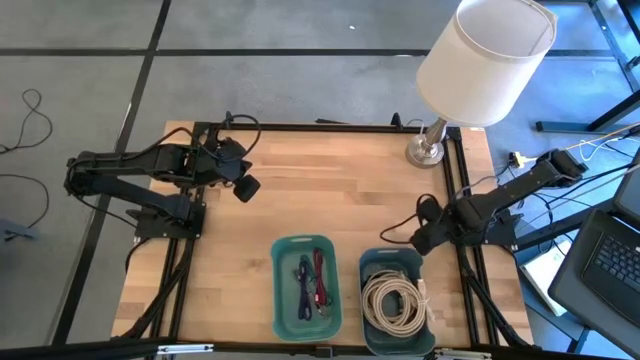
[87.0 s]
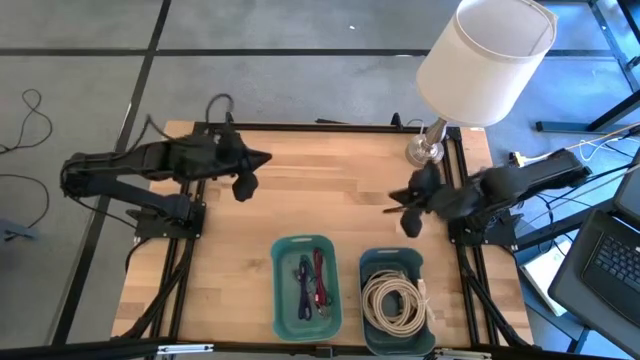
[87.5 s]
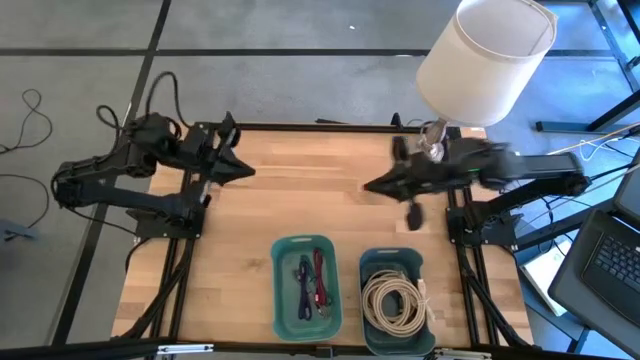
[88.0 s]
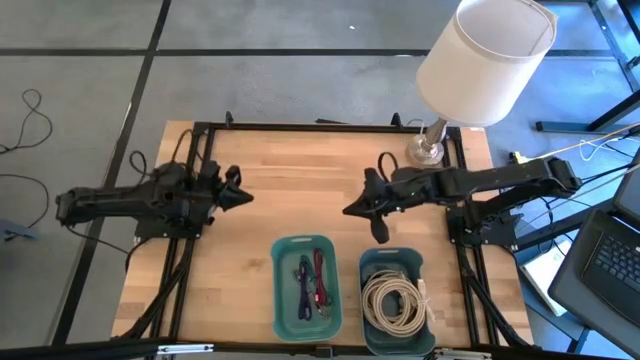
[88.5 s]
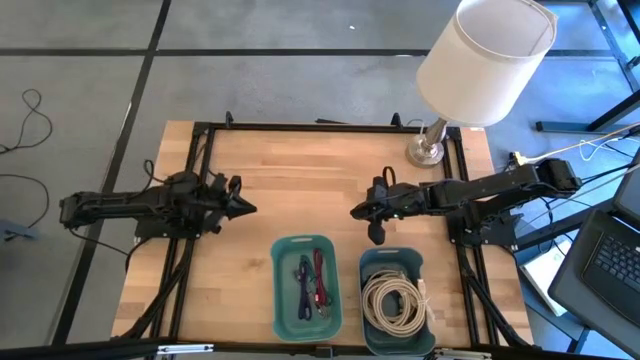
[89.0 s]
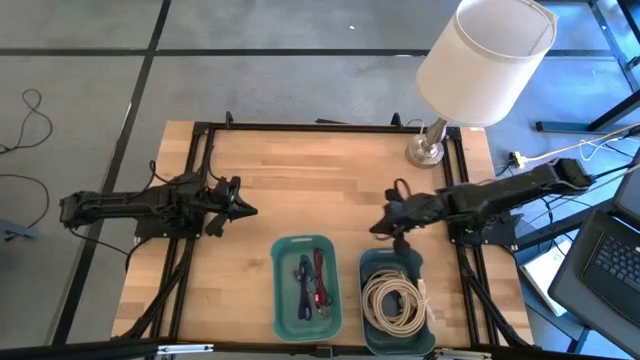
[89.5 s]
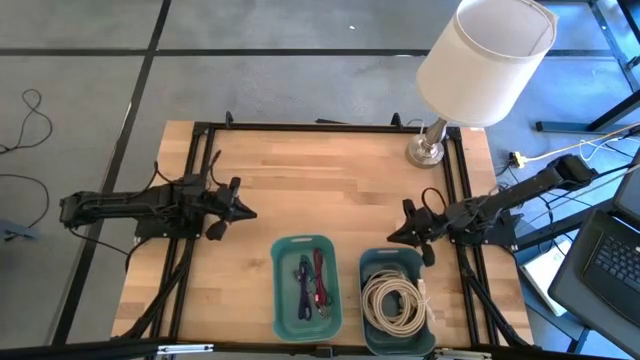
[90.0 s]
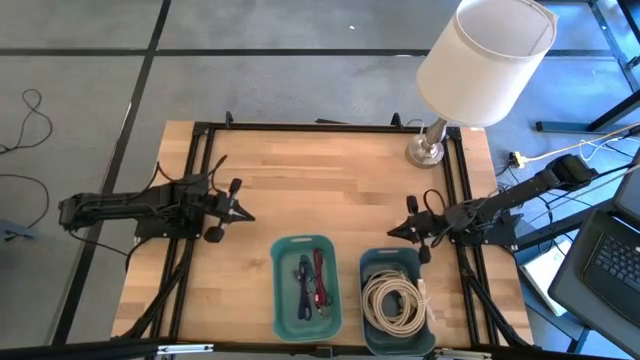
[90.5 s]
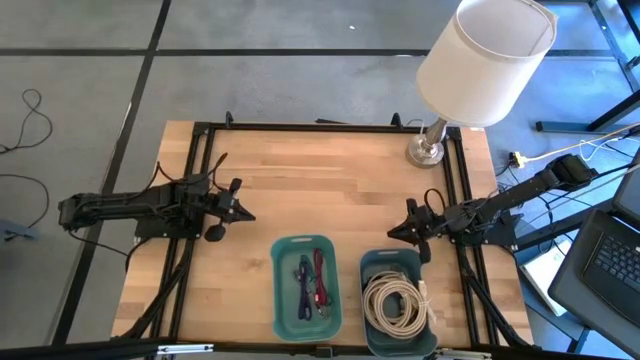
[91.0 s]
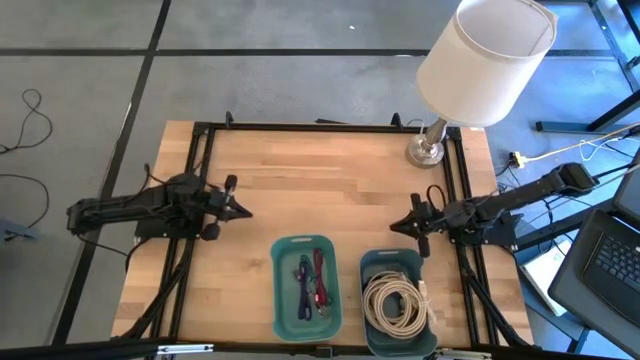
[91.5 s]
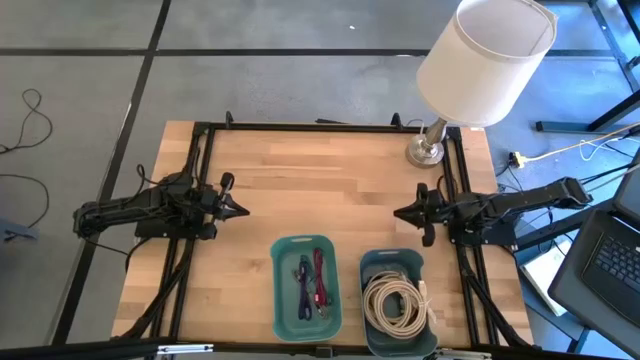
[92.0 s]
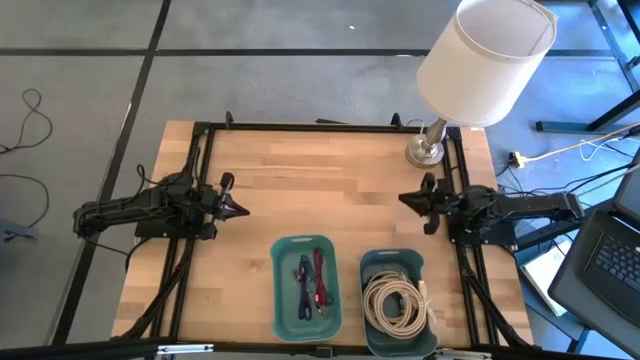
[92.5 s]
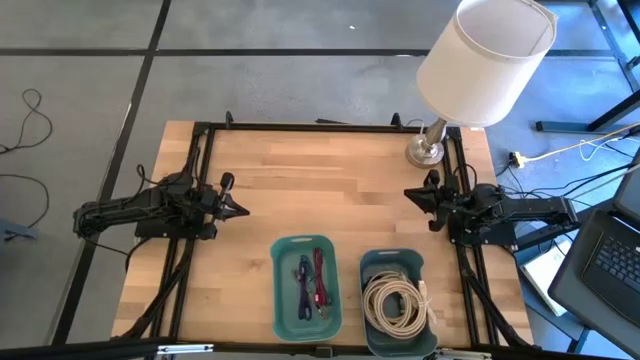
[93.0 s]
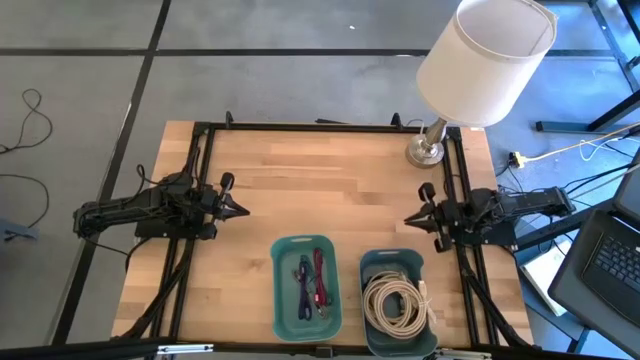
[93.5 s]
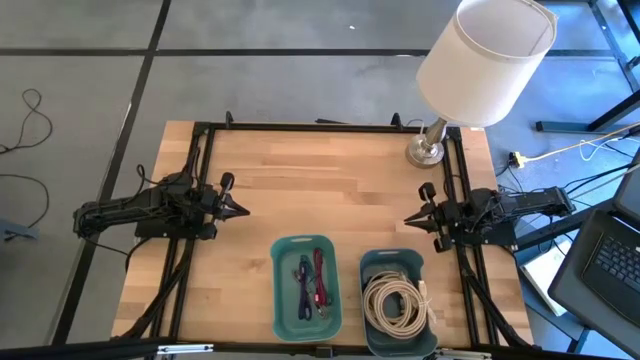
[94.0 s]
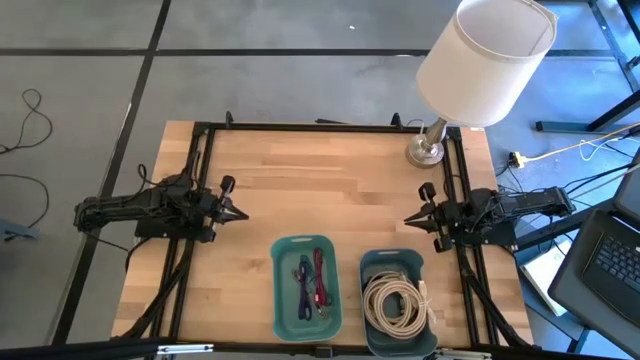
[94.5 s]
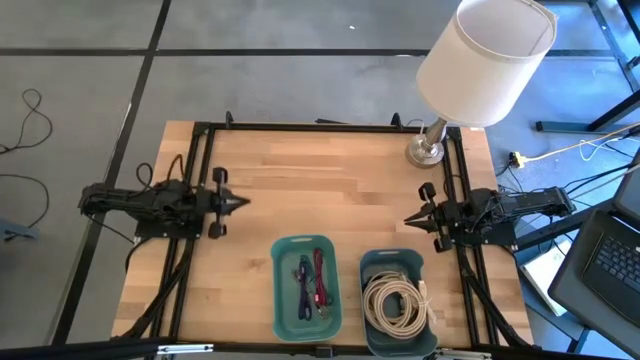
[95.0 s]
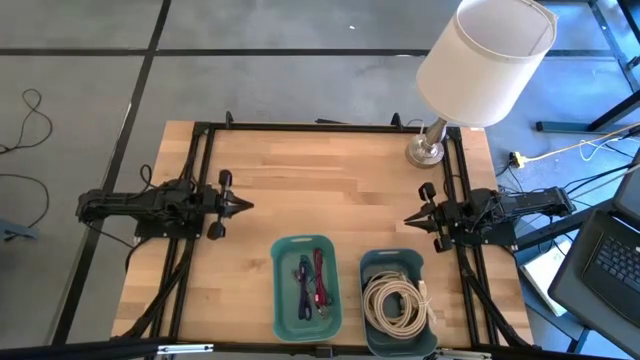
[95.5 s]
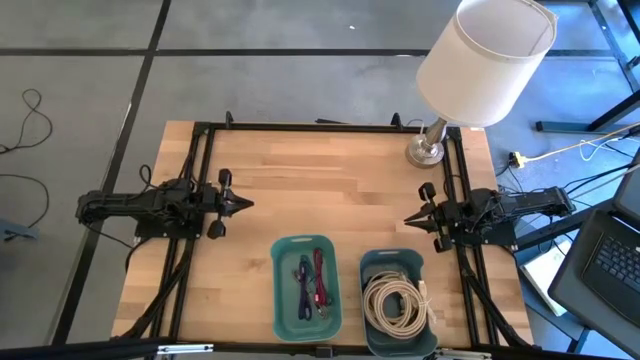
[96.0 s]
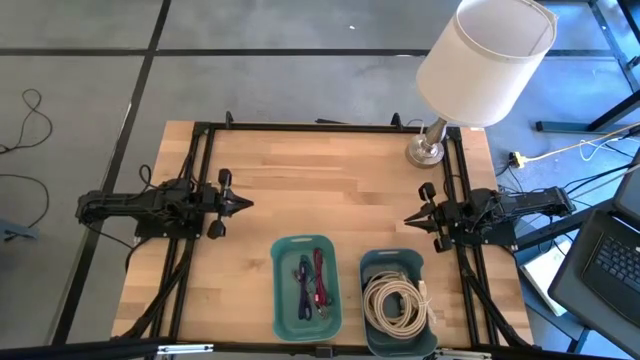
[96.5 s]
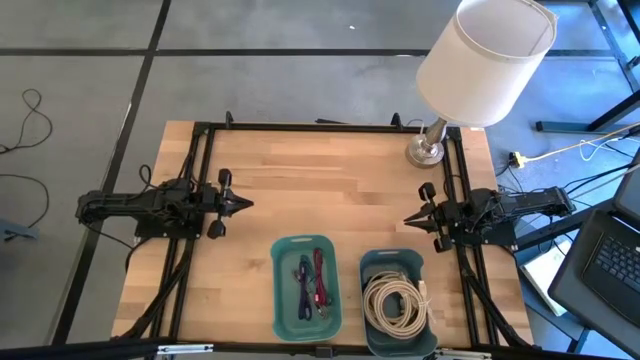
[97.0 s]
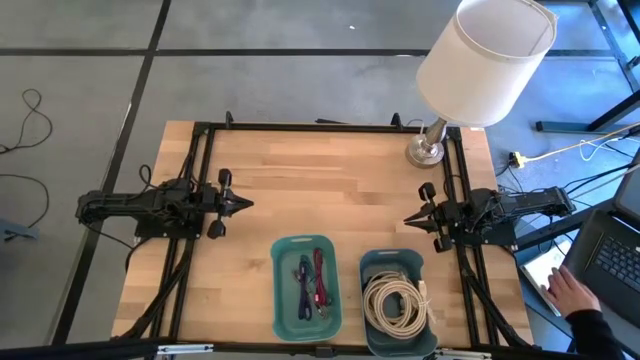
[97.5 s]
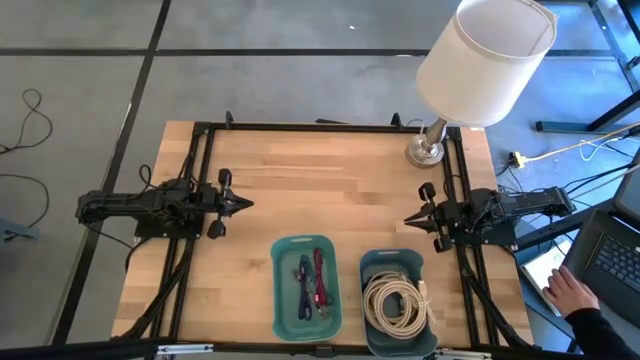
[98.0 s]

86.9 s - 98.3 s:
Task: Pick and place USB-C Cables
Return to Home Position

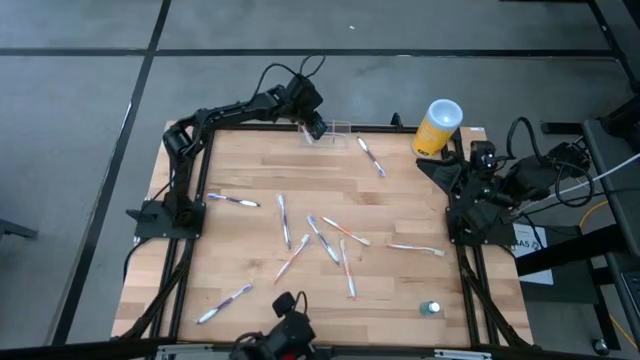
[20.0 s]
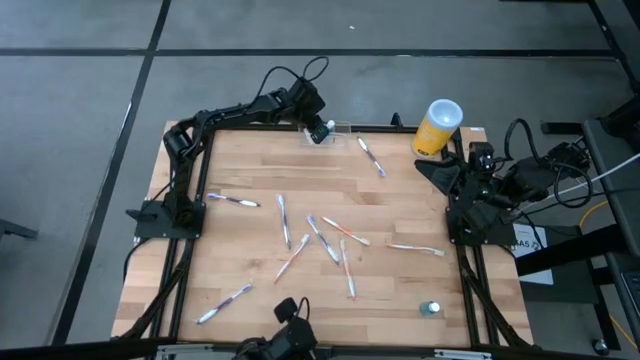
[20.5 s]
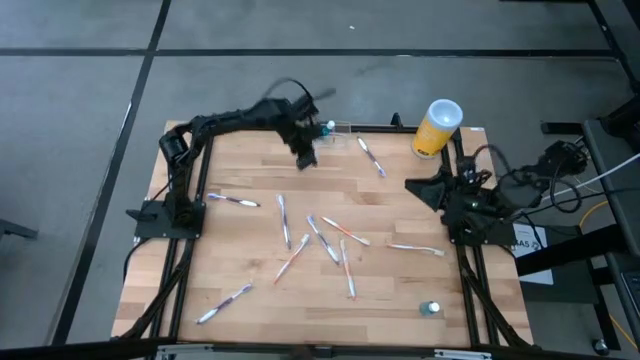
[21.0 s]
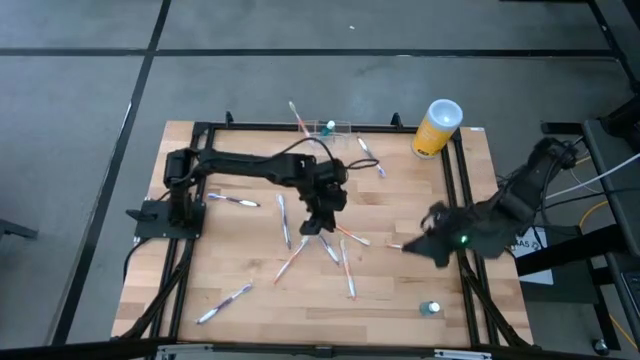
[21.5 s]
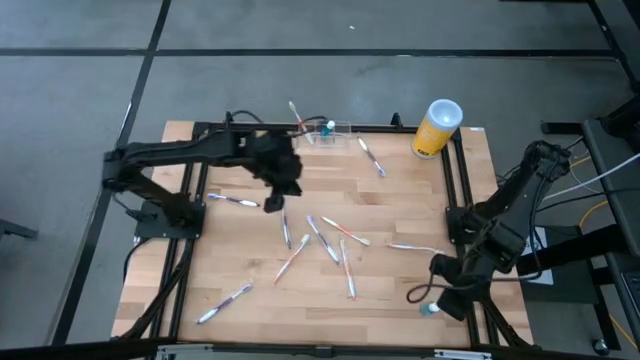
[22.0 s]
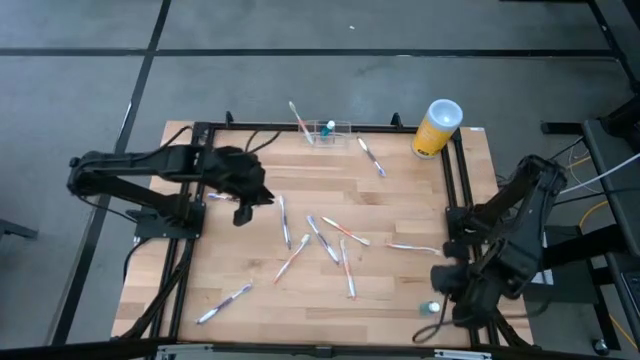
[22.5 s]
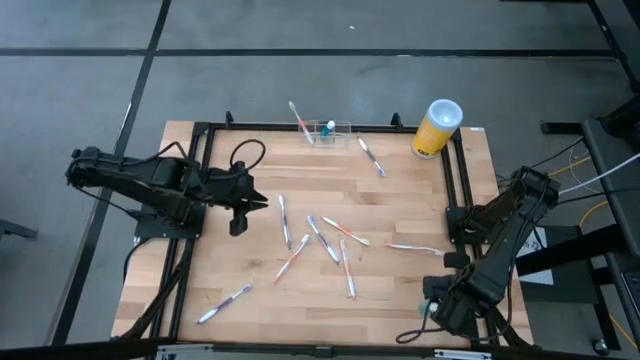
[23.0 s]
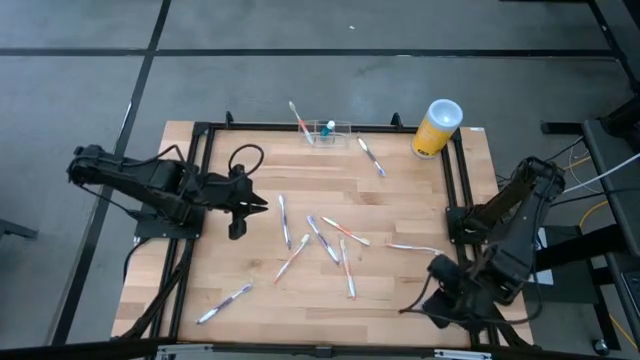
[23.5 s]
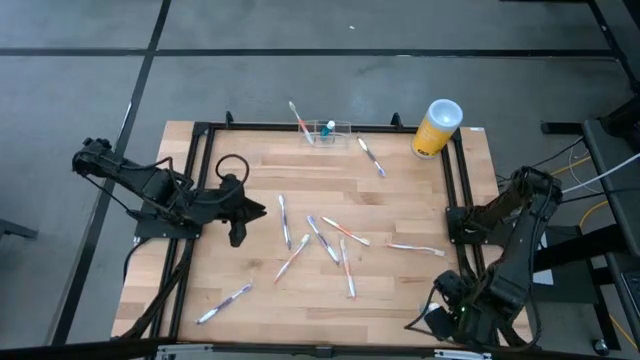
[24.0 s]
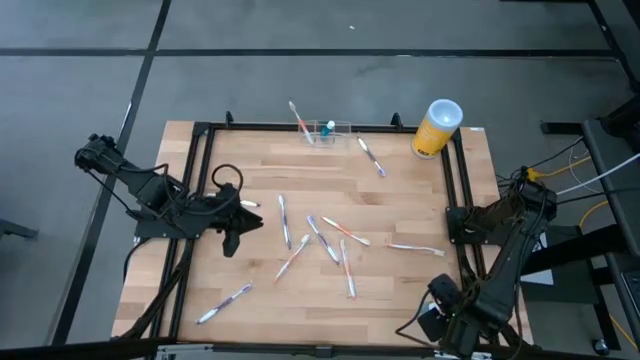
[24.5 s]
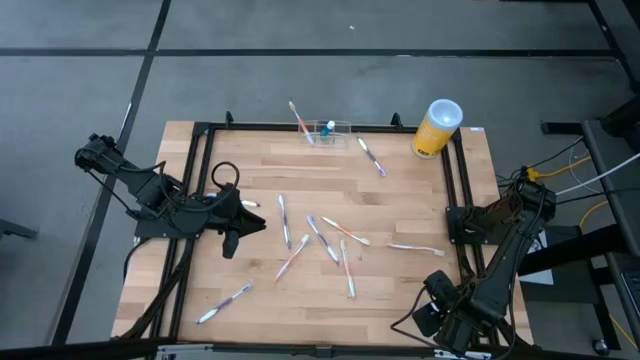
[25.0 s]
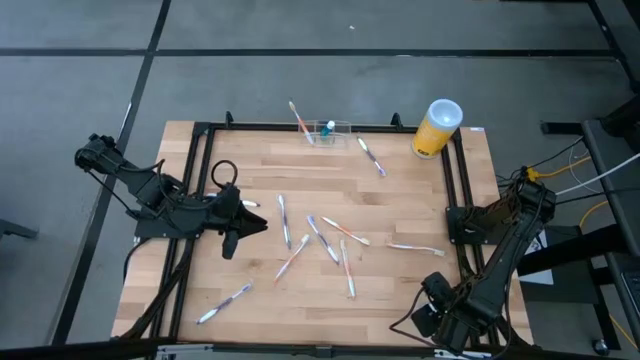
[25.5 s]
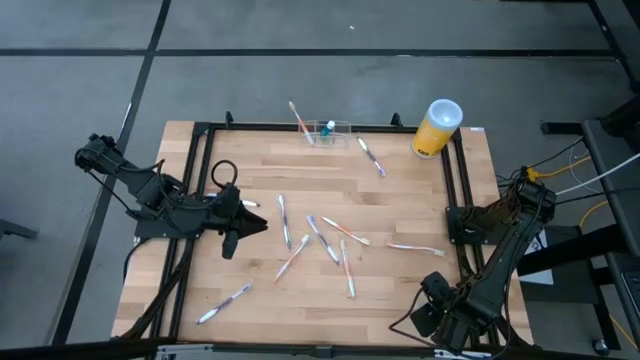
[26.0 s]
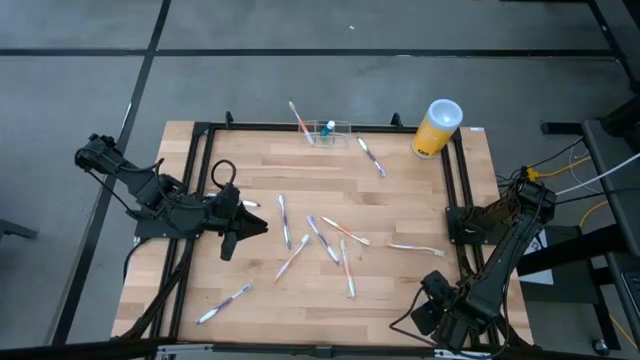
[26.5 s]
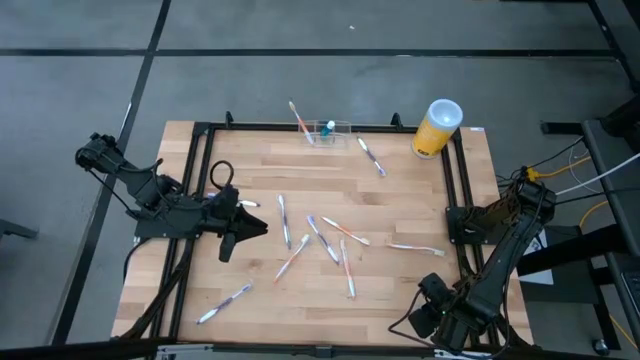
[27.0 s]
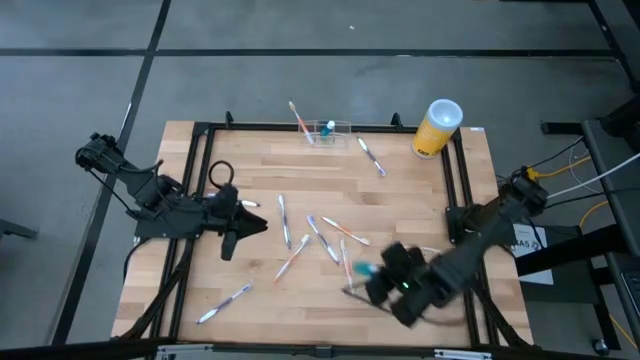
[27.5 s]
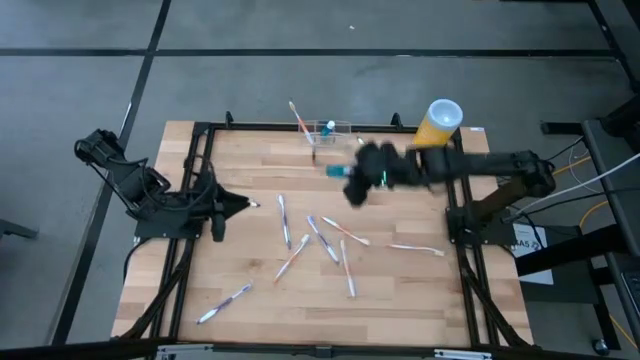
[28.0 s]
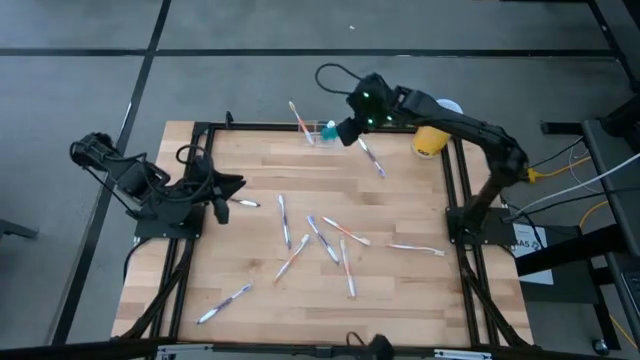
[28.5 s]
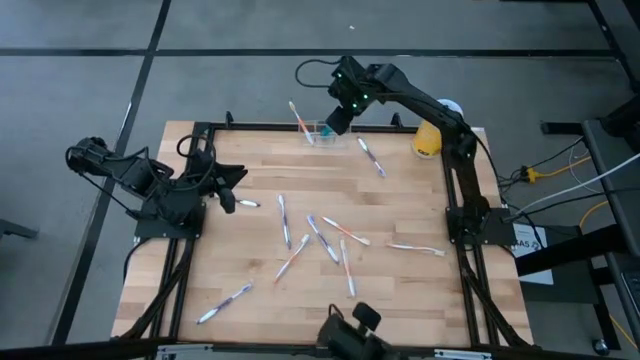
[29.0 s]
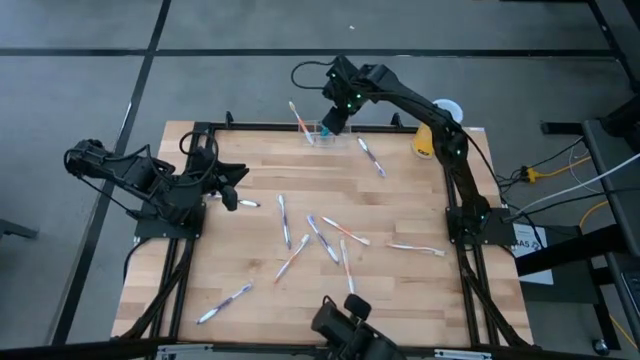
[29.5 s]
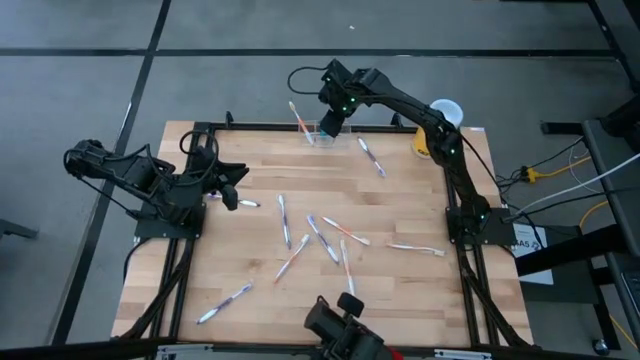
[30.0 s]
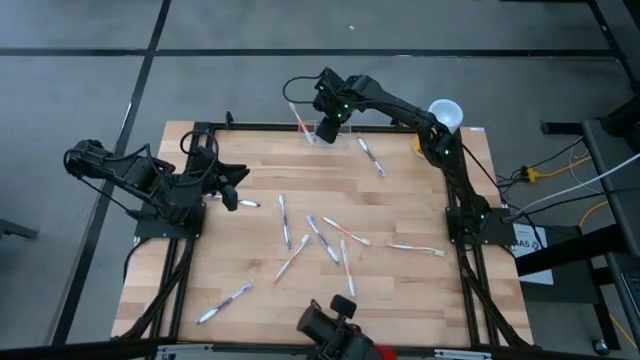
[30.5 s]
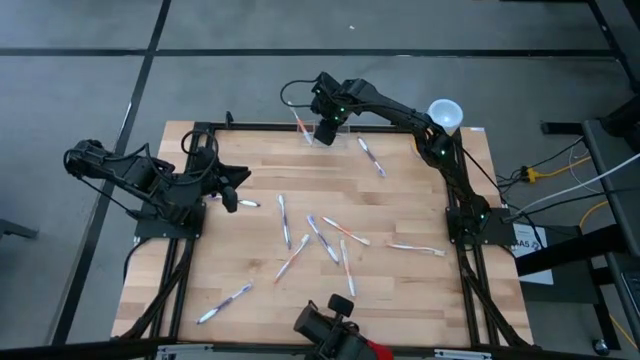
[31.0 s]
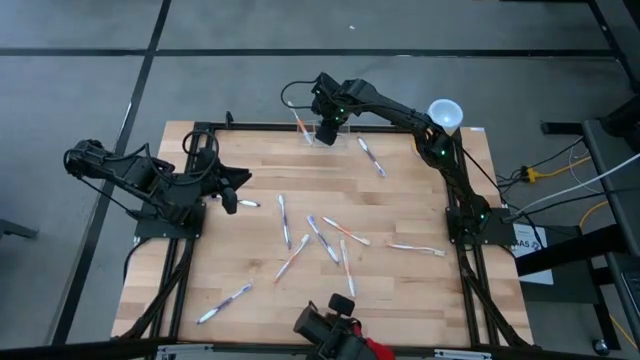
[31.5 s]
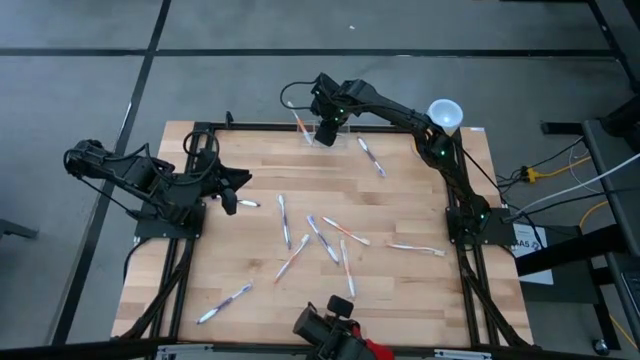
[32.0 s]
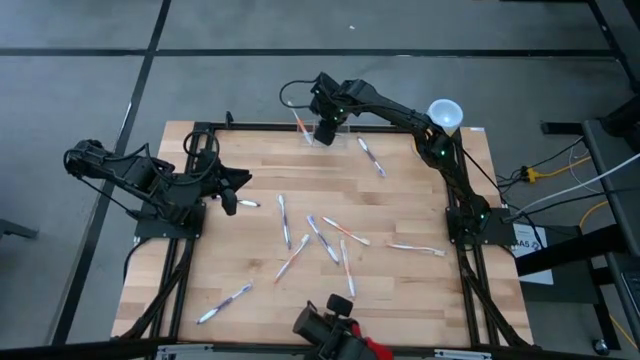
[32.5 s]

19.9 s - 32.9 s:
Task: Pick & Place toothbrushing station
Put the blue mouthwash into the transparent organizer
